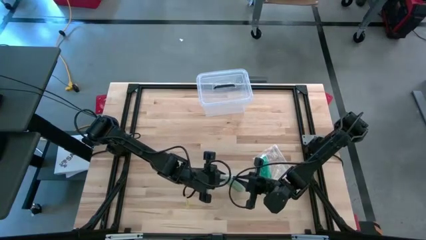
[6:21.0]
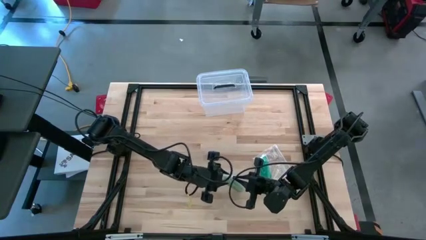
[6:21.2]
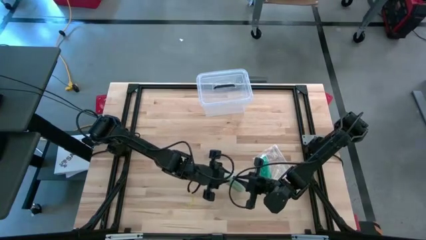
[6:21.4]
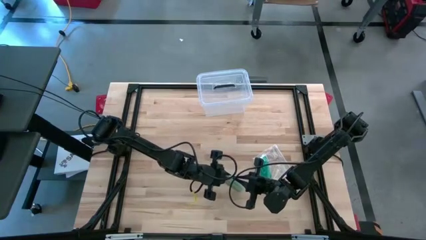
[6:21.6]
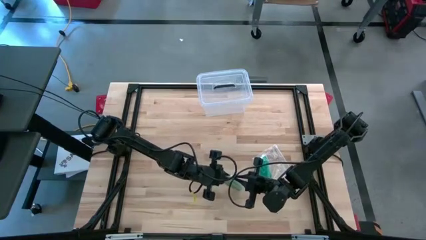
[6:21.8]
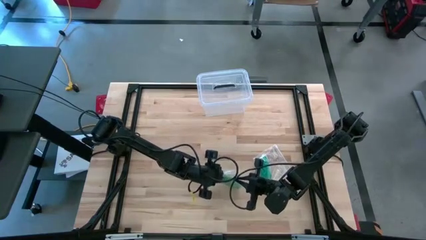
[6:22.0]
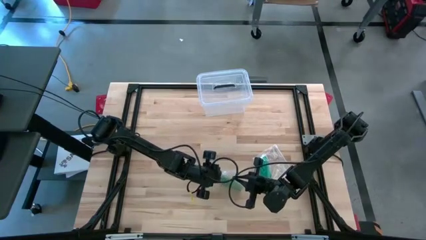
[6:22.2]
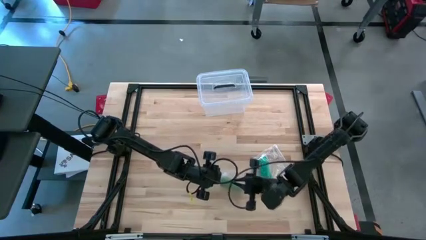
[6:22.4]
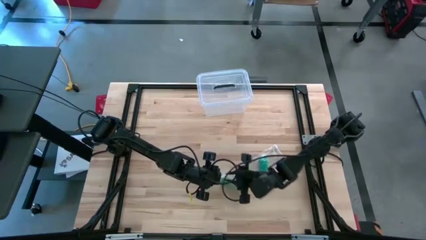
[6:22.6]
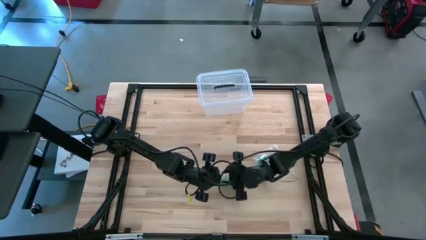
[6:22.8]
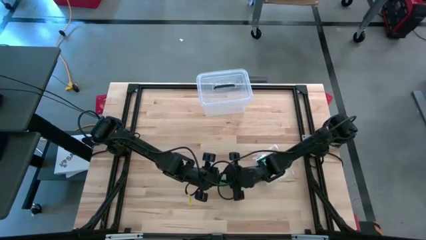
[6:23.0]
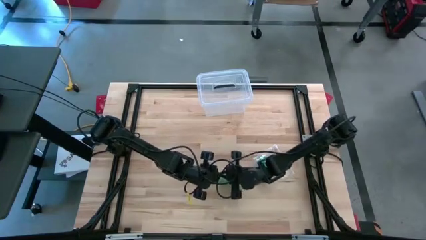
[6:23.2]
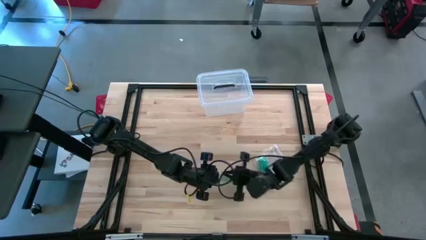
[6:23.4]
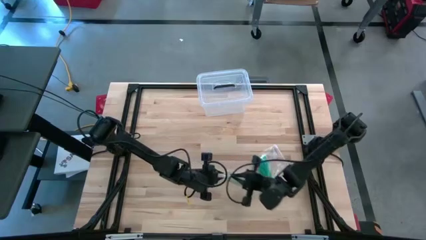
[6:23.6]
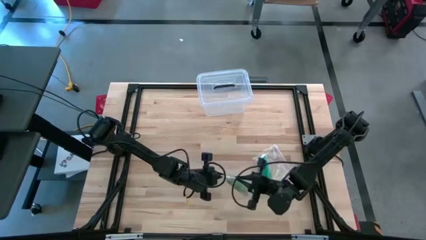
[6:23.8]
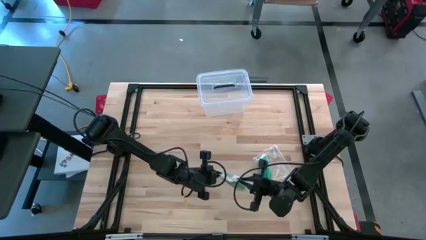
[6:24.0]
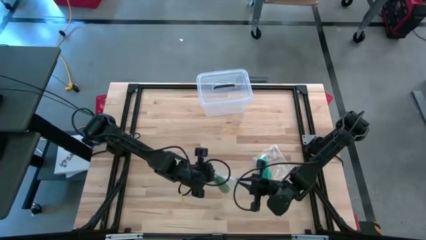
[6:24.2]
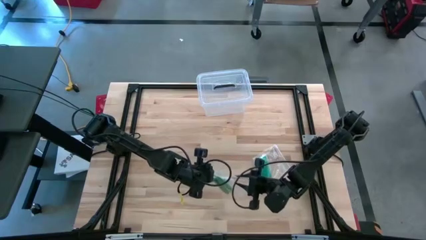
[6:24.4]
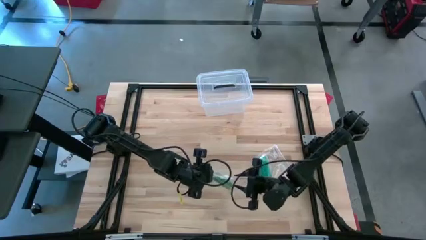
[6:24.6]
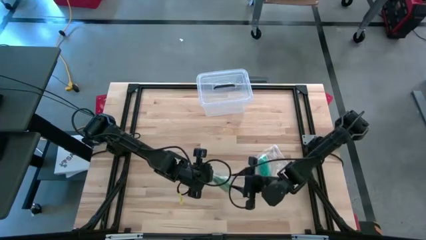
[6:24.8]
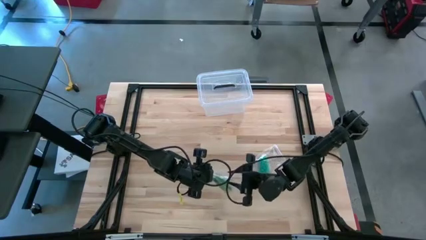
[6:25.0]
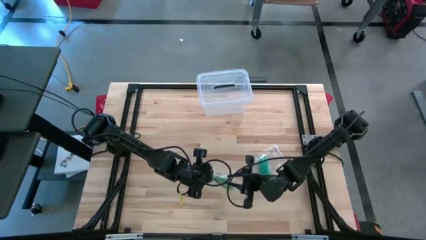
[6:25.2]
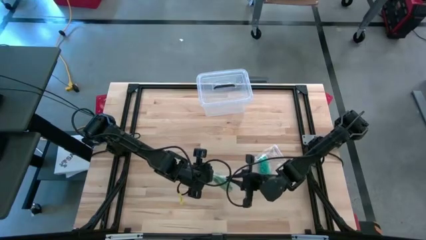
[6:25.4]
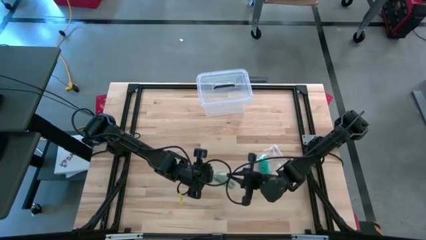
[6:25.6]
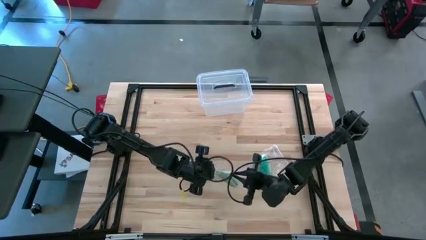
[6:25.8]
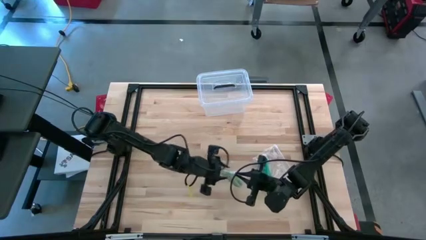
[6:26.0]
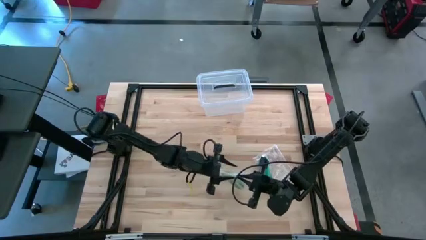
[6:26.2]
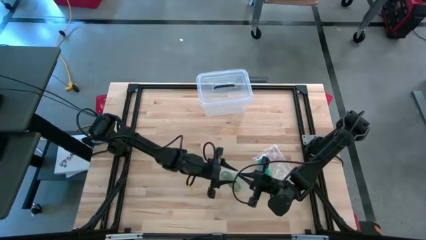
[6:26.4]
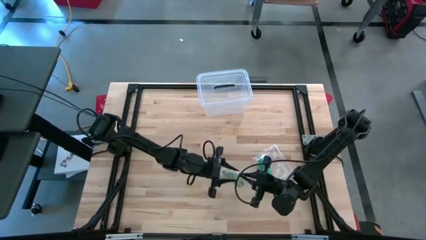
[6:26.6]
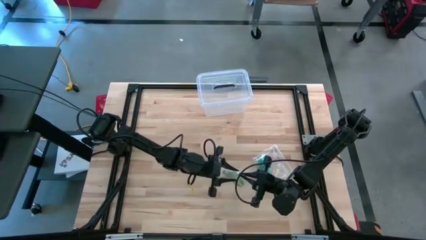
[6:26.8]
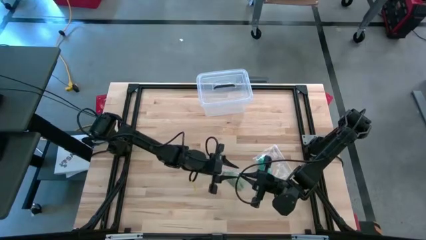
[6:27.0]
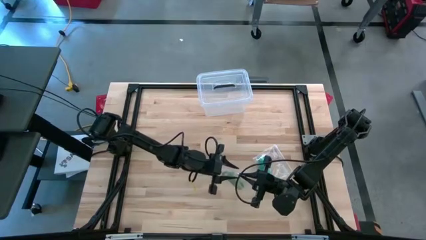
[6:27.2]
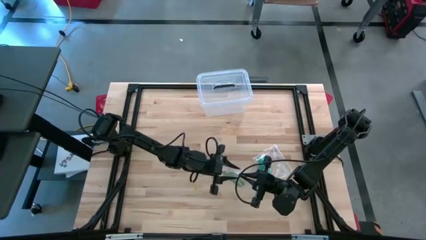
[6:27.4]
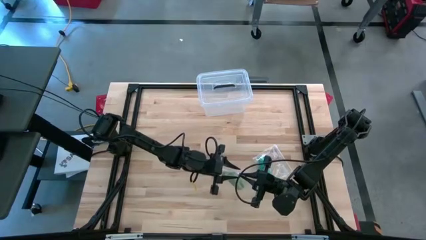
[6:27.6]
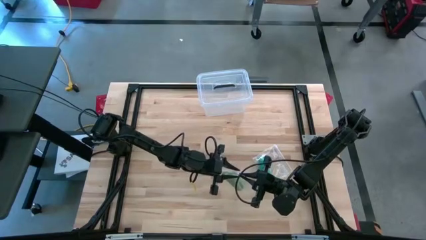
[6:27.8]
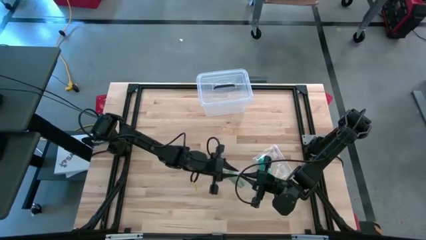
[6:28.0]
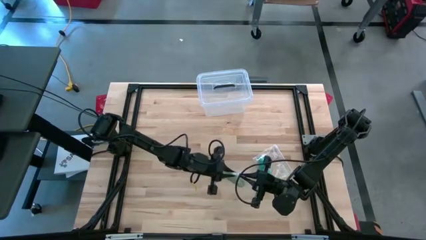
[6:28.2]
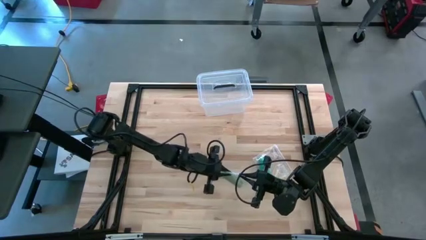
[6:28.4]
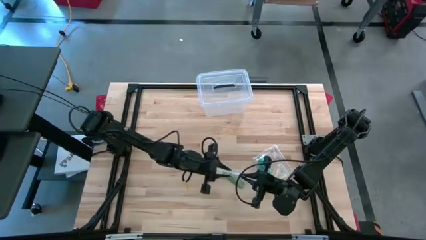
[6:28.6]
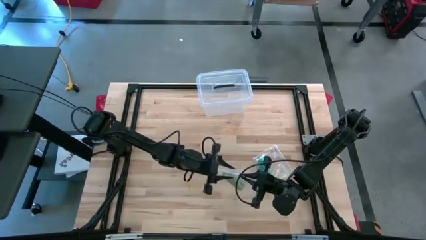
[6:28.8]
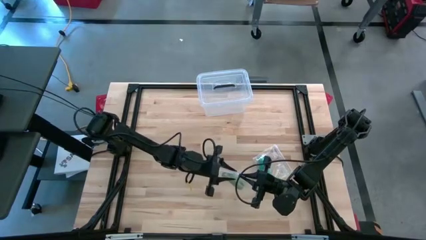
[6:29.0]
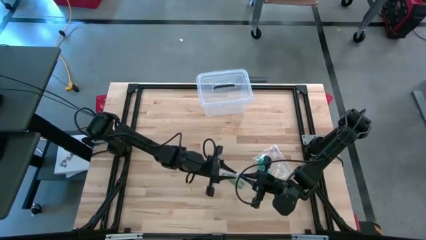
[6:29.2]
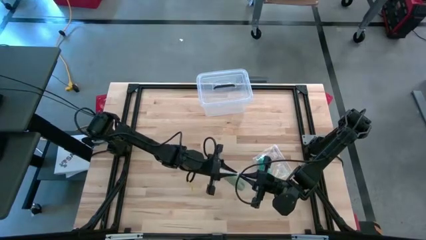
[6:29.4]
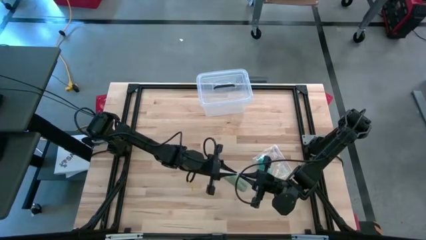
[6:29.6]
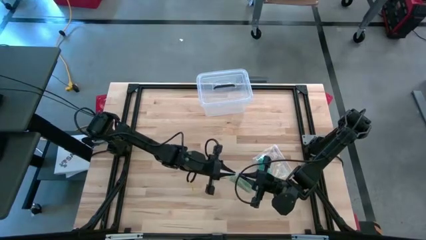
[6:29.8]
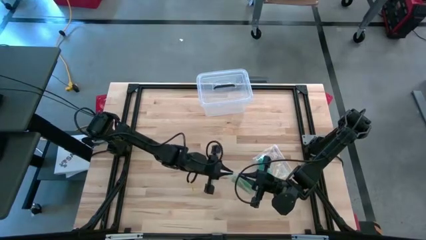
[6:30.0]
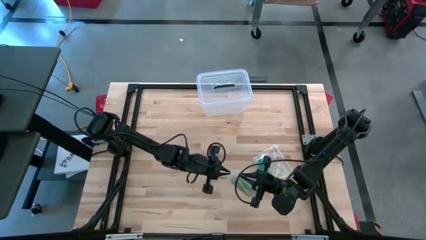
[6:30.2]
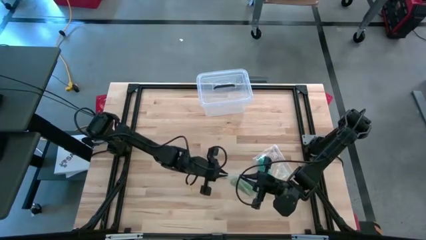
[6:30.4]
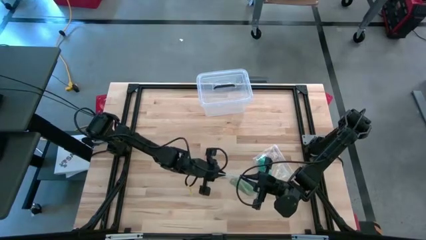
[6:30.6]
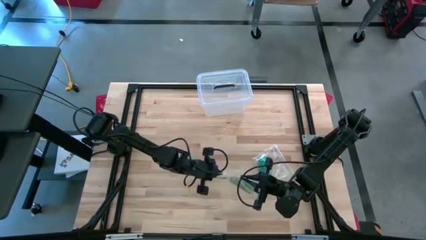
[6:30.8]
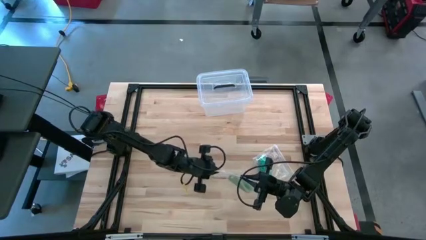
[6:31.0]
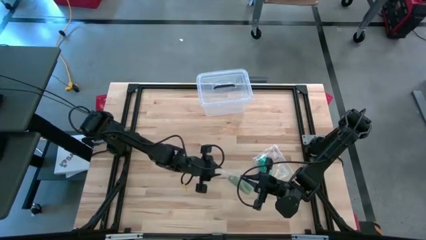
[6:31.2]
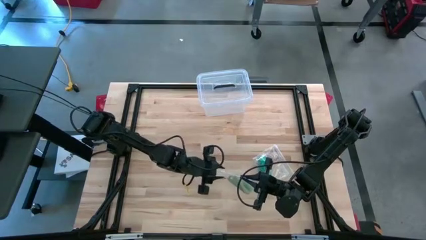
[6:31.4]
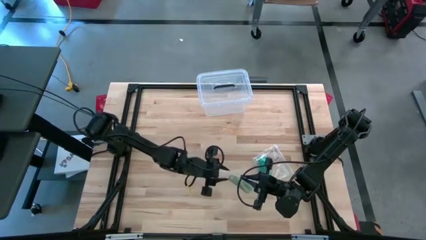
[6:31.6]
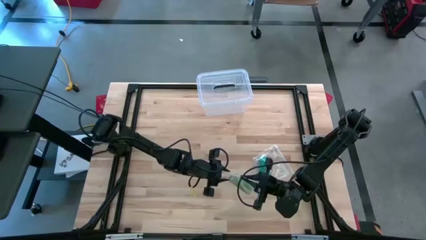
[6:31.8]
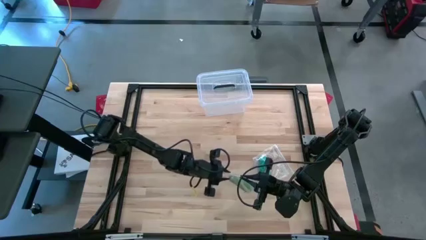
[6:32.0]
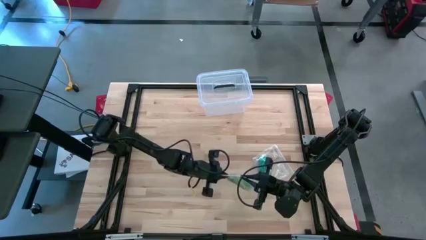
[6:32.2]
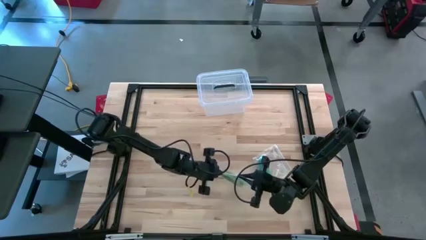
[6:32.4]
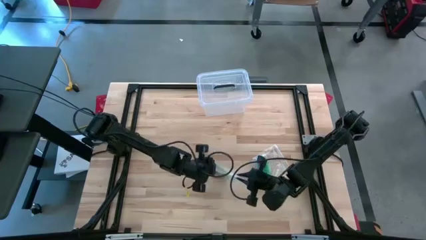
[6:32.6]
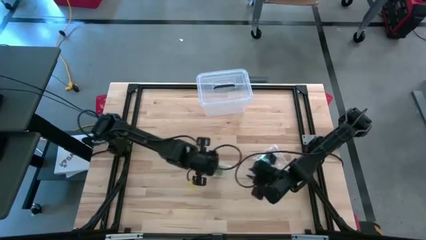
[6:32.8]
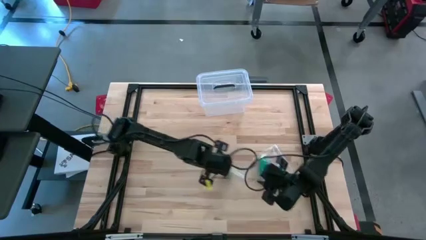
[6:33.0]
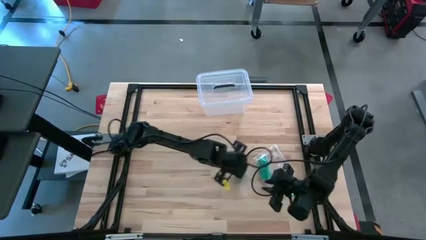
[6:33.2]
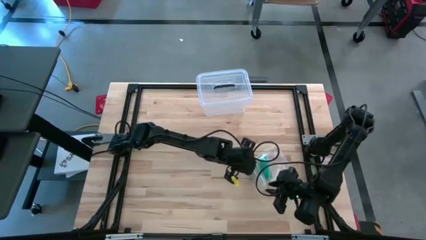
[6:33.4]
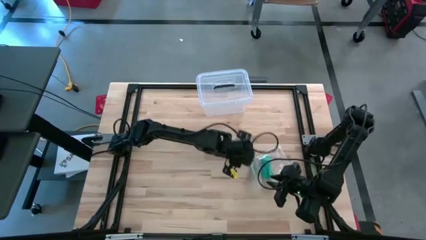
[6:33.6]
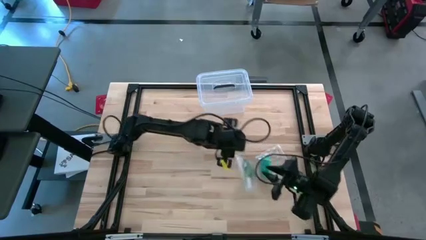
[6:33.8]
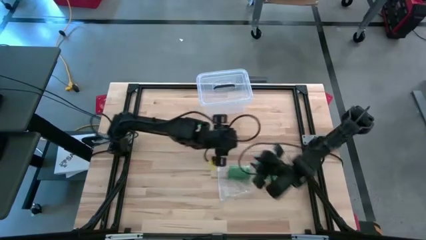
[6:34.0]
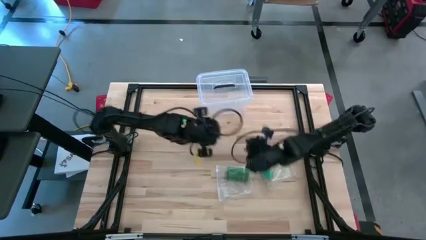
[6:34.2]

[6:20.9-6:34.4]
Task: Roll bandage
Close the transparent zip bag

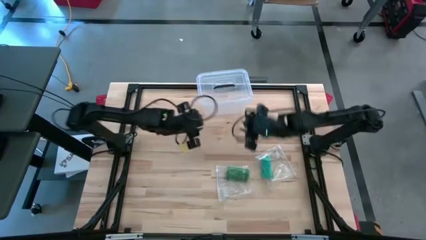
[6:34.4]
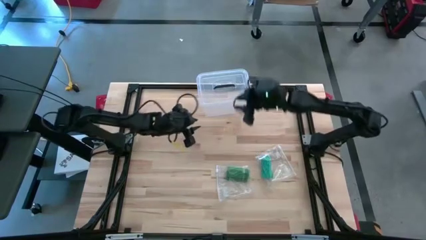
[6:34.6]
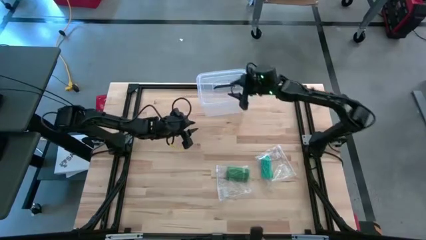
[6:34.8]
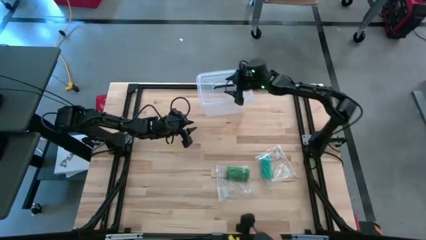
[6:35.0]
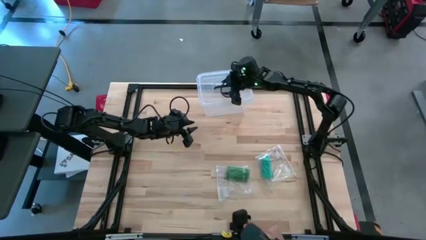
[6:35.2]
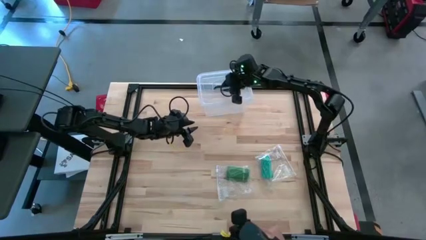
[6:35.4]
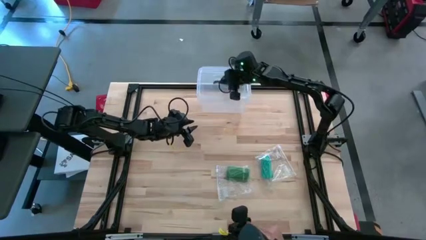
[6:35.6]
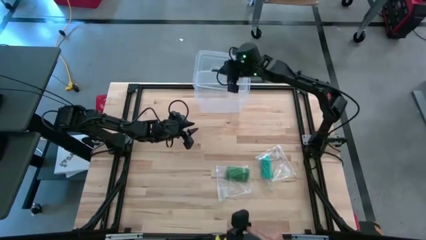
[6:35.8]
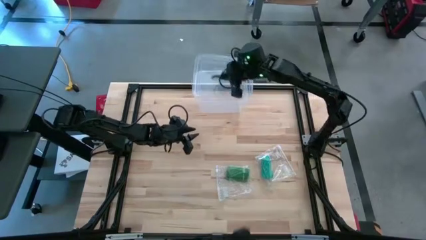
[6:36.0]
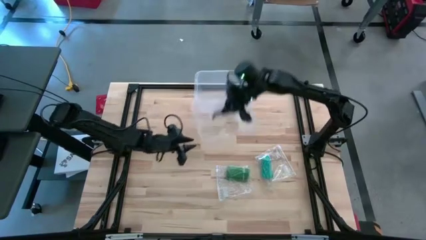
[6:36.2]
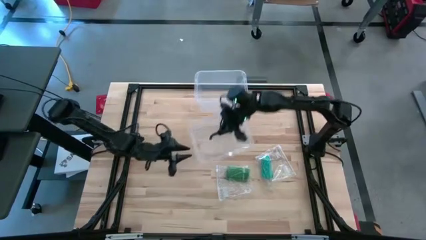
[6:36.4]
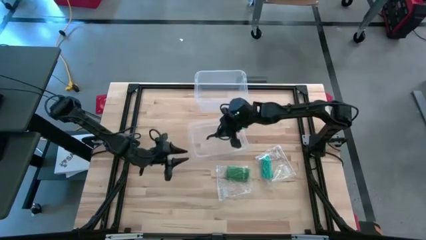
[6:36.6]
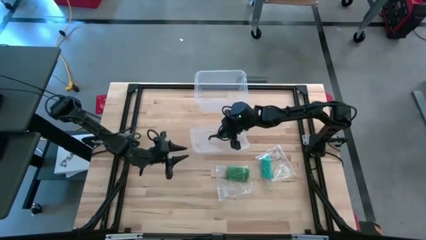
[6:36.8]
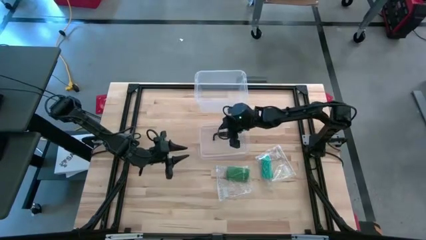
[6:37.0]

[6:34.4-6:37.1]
Open the transparent bin
